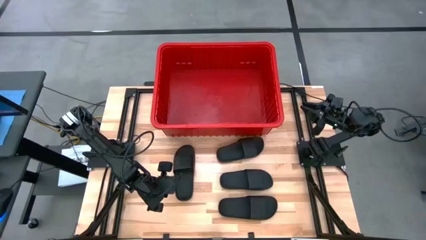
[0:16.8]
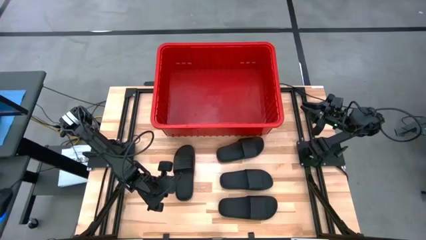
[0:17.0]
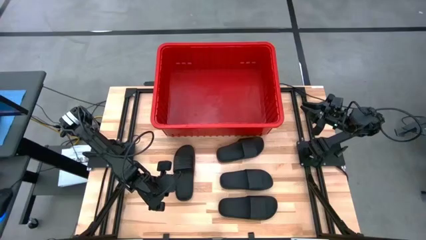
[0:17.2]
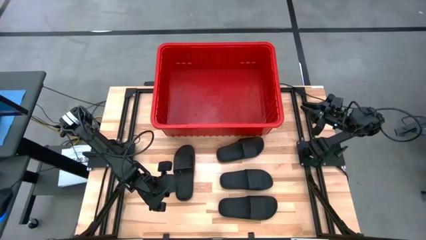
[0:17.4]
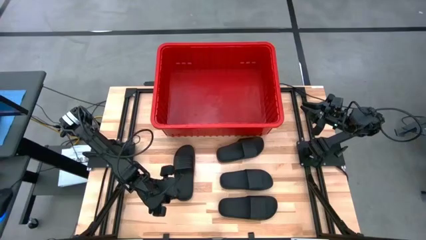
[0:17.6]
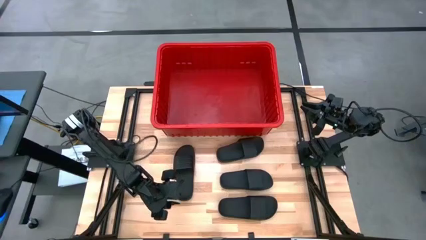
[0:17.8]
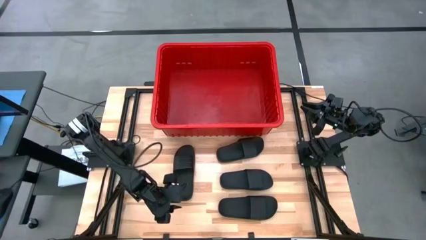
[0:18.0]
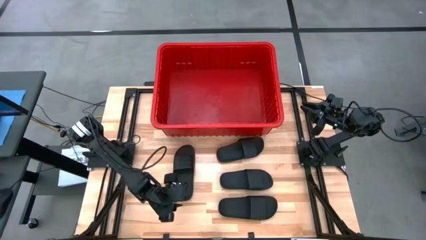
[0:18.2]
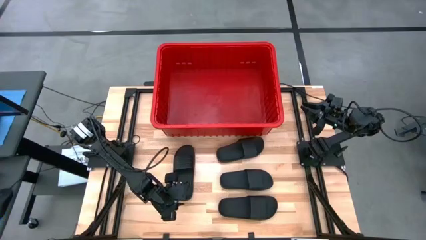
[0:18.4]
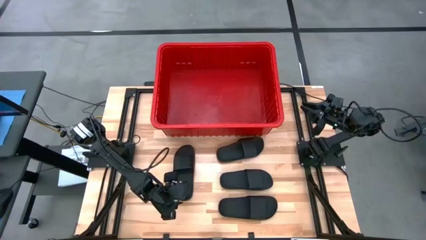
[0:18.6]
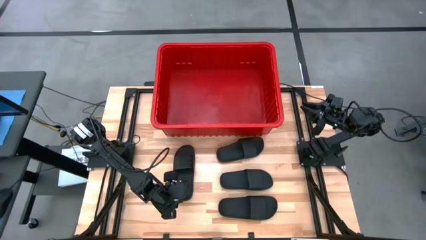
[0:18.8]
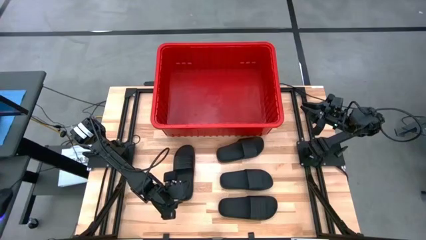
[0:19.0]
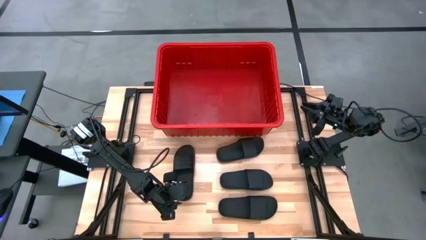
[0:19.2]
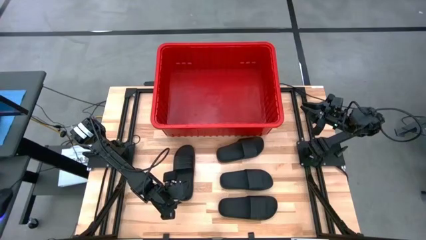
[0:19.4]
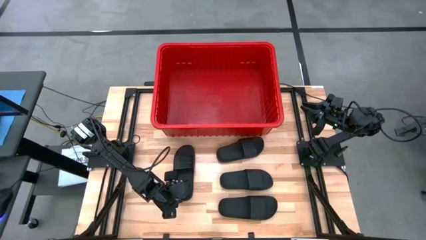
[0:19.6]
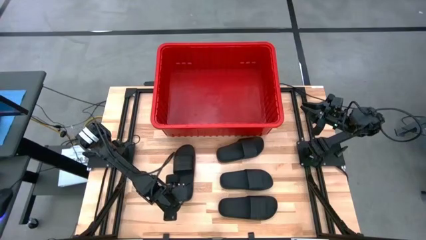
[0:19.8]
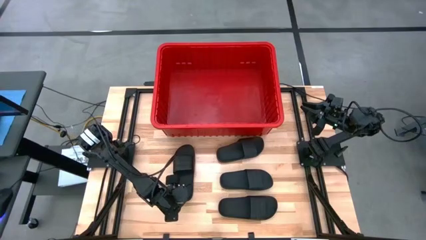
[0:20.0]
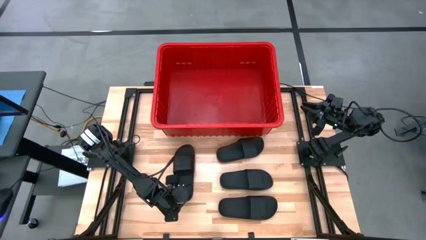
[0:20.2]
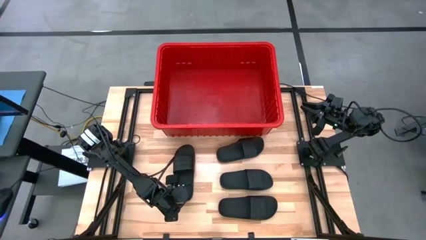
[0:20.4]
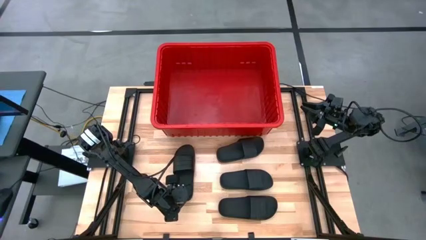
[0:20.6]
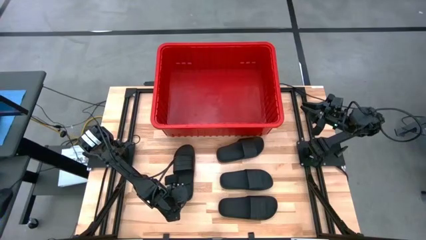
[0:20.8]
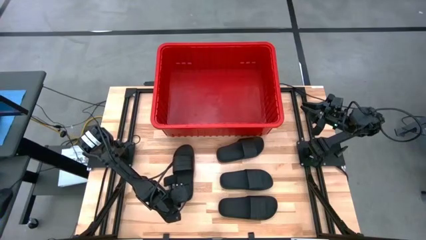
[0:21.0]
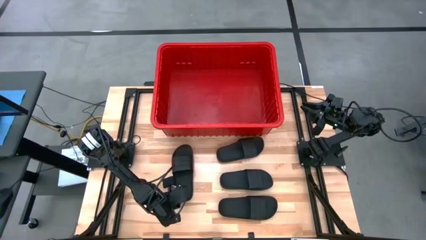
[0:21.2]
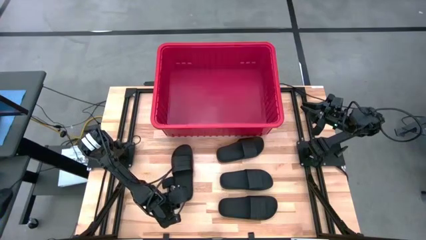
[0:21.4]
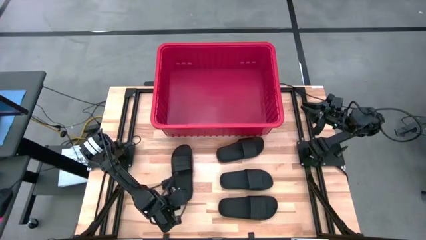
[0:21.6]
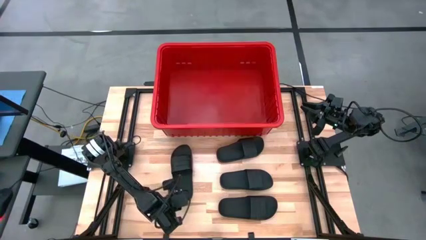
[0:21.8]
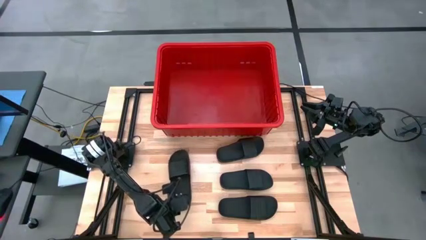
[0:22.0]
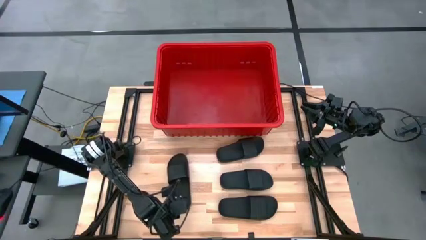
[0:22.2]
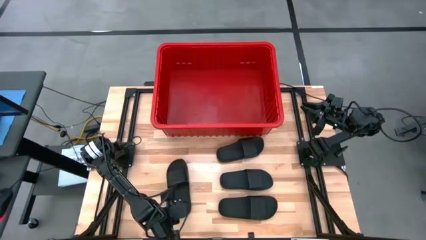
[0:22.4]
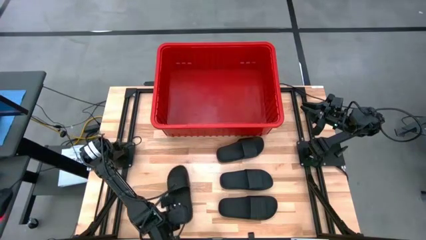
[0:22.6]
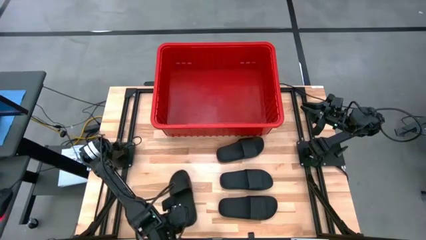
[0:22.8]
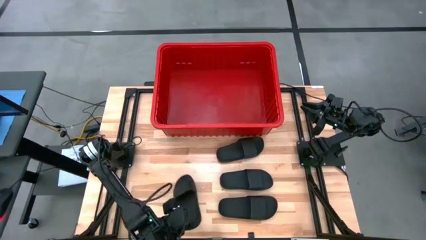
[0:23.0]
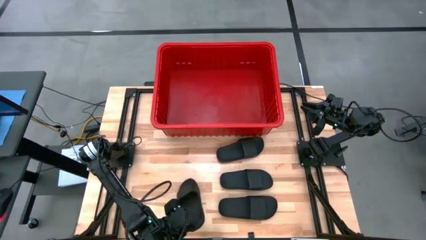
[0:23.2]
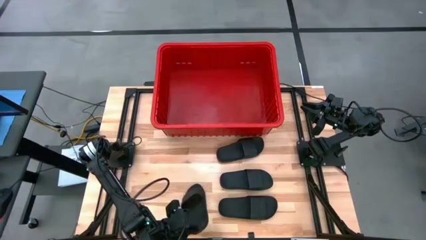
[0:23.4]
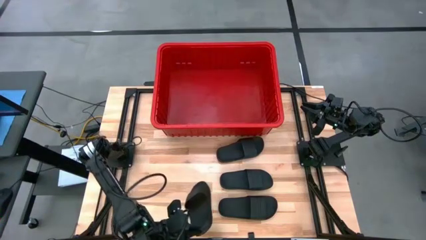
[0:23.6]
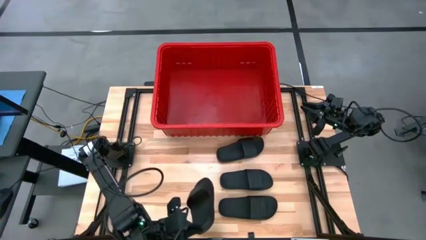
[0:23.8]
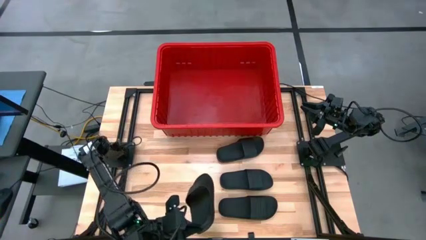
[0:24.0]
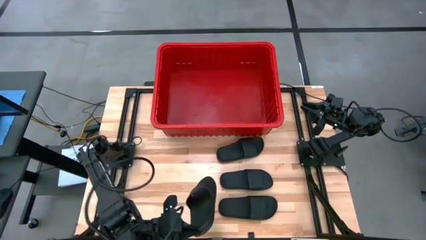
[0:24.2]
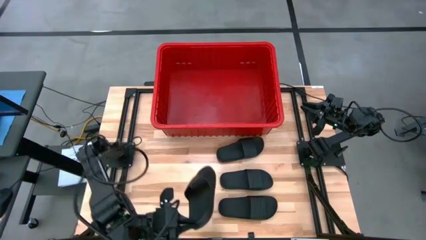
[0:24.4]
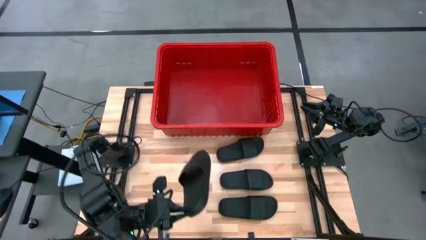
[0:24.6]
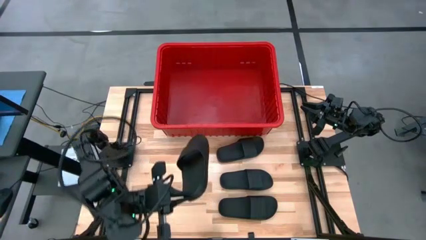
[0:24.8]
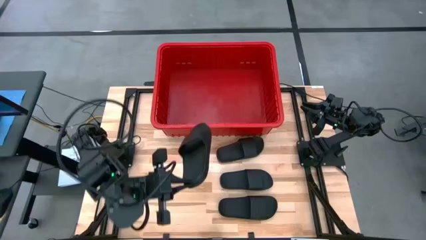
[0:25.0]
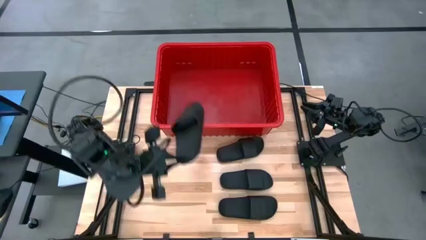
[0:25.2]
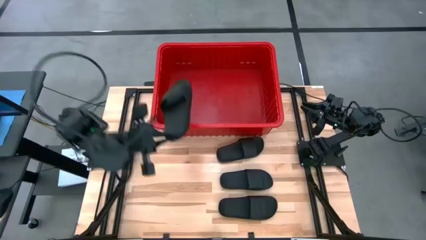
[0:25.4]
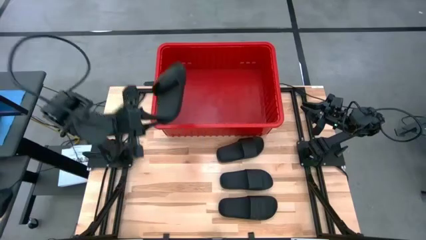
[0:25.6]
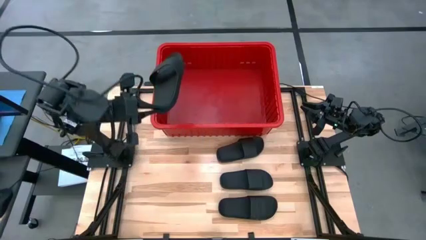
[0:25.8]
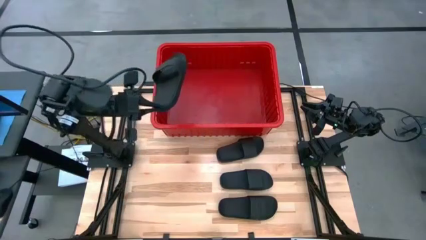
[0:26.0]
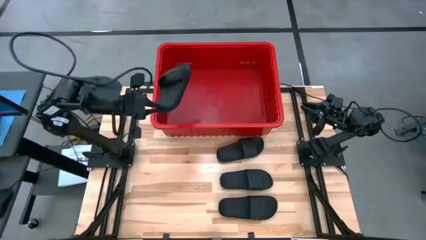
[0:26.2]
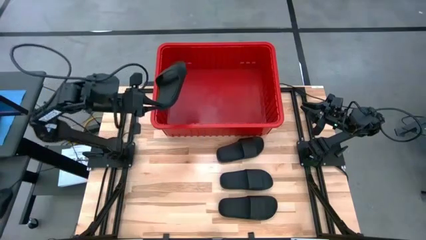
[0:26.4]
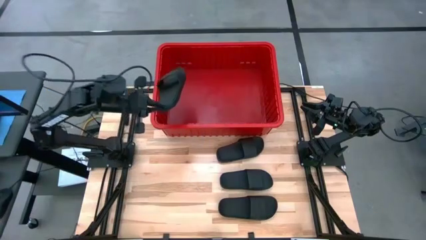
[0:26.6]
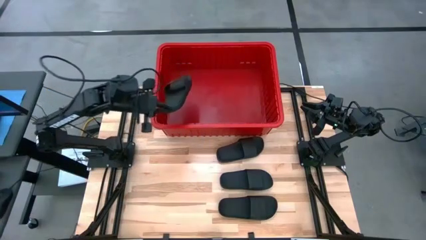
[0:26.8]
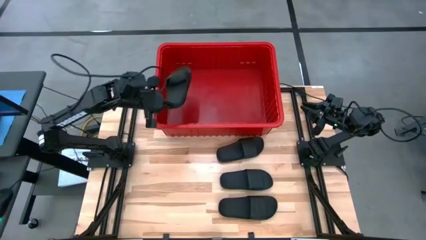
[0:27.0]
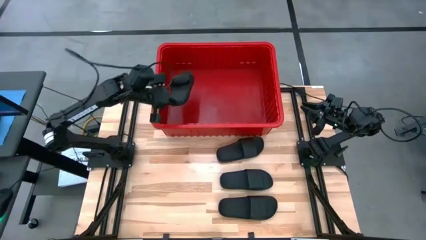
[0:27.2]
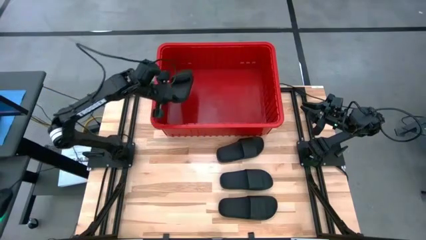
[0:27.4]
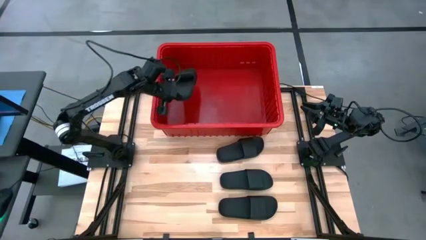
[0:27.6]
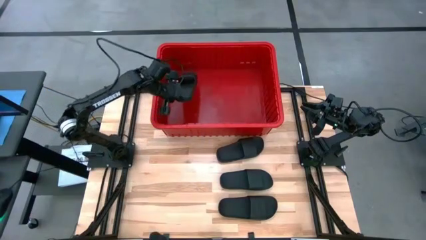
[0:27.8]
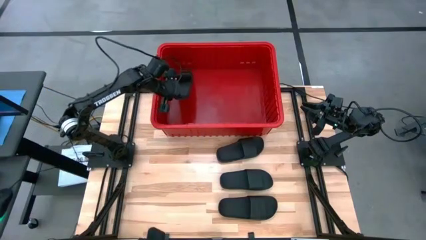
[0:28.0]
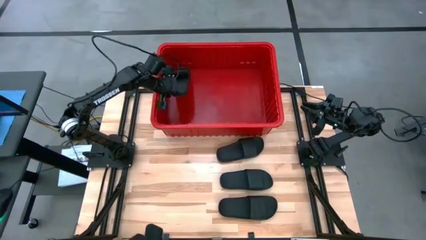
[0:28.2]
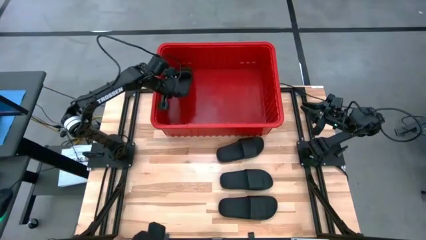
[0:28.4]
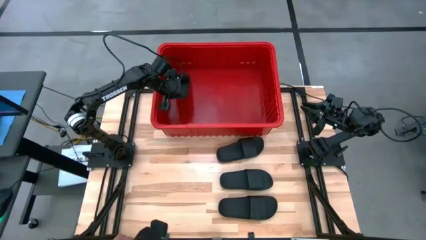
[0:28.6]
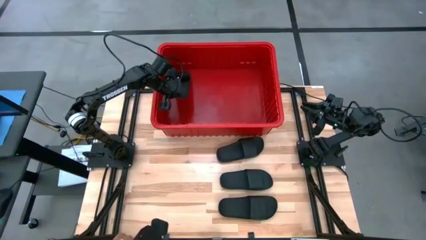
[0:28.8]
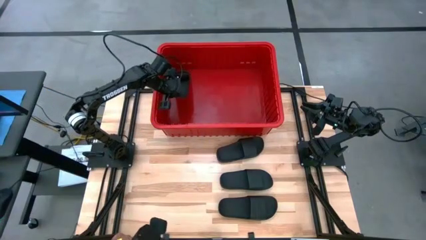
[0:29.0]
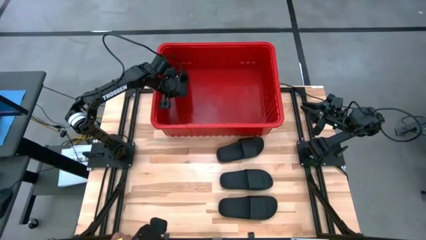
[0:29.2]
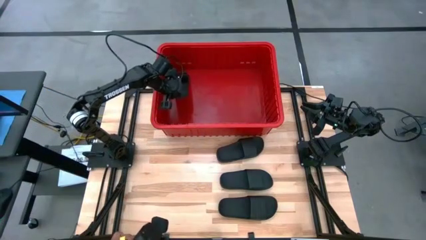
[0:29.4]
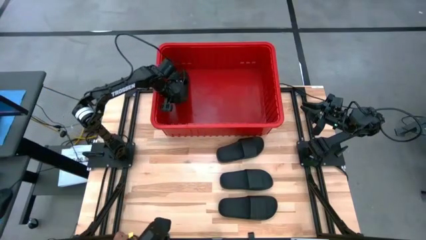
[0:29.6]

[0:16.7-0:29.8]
Task: Pick and place slides into bin
Put the black slide into the red bin
